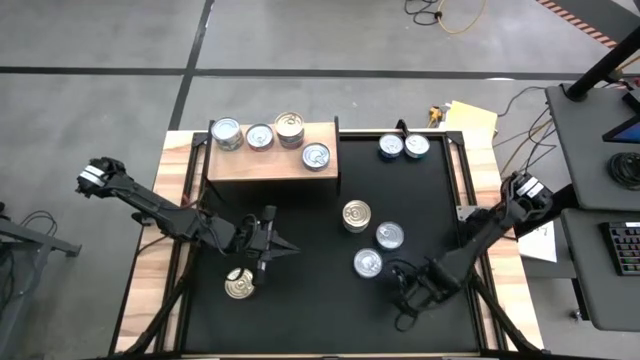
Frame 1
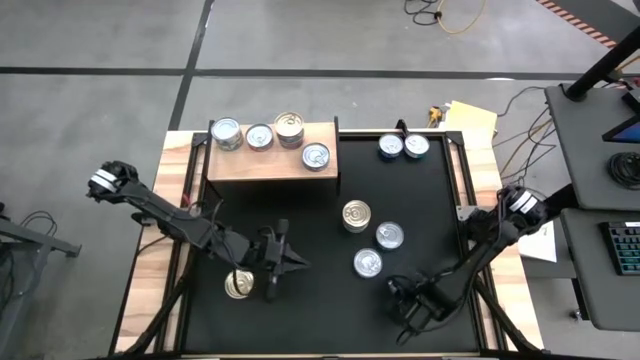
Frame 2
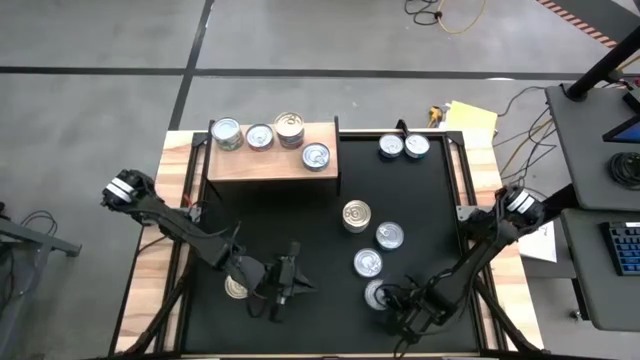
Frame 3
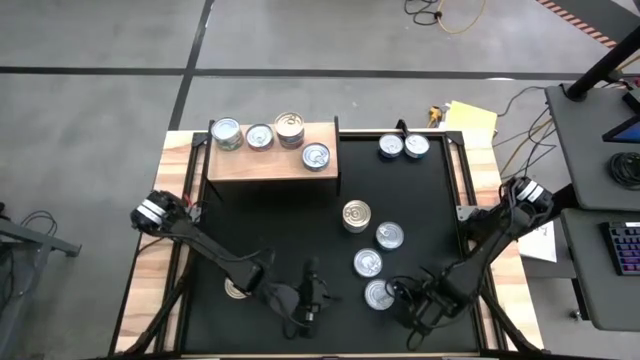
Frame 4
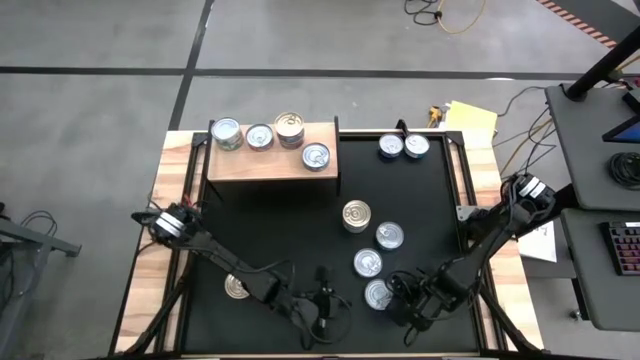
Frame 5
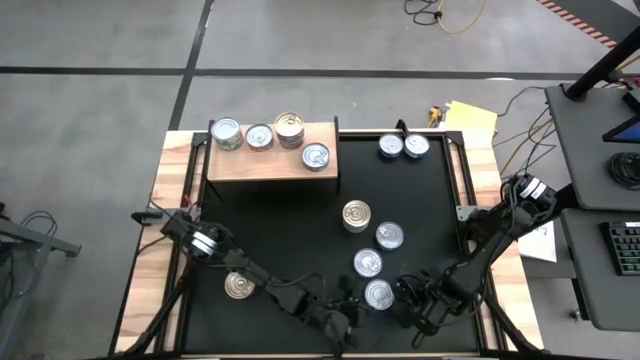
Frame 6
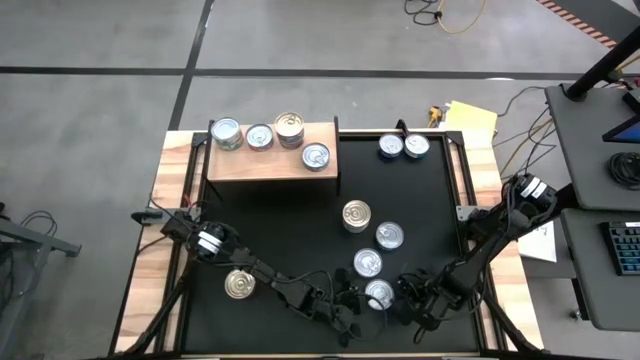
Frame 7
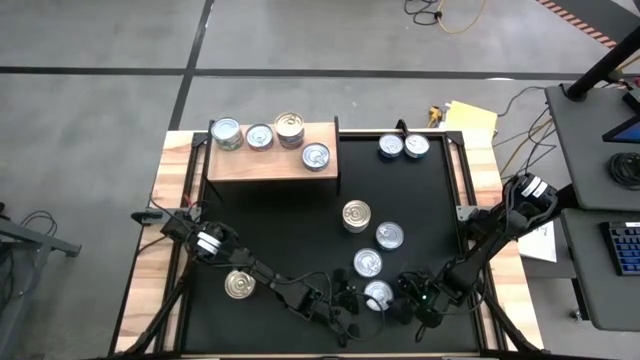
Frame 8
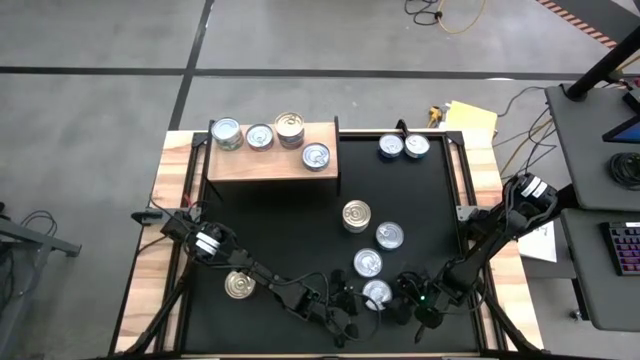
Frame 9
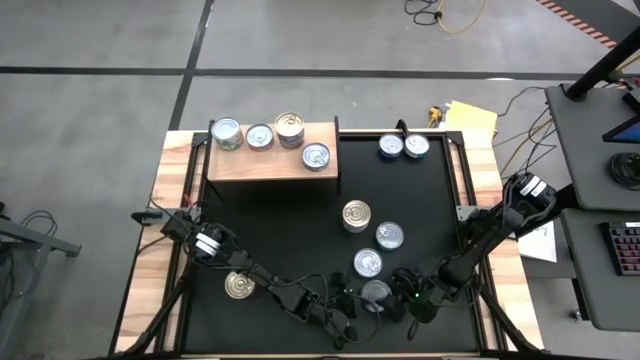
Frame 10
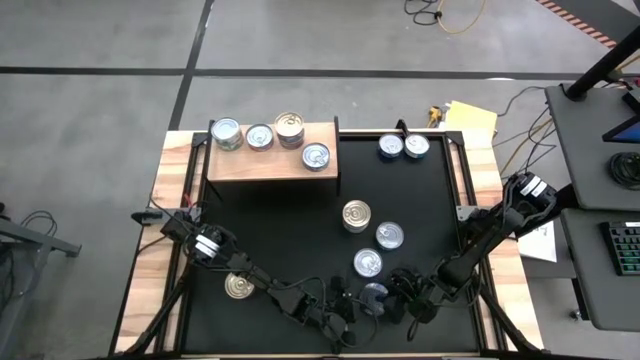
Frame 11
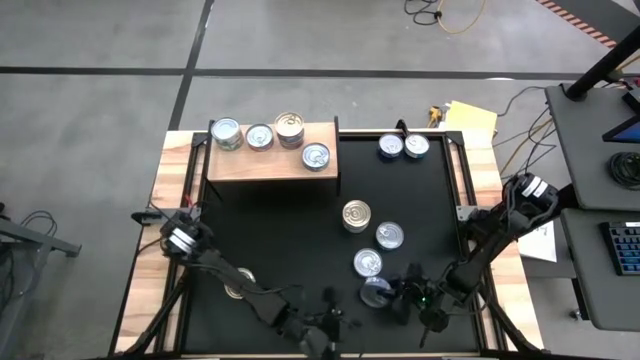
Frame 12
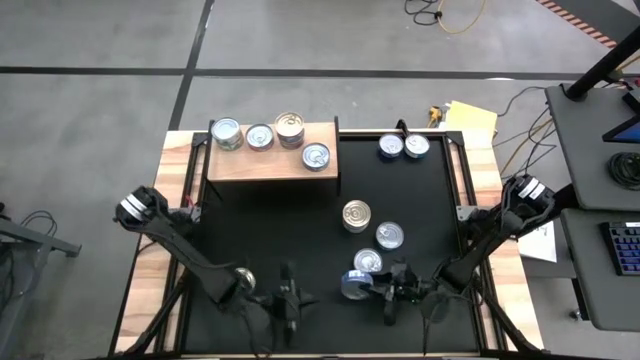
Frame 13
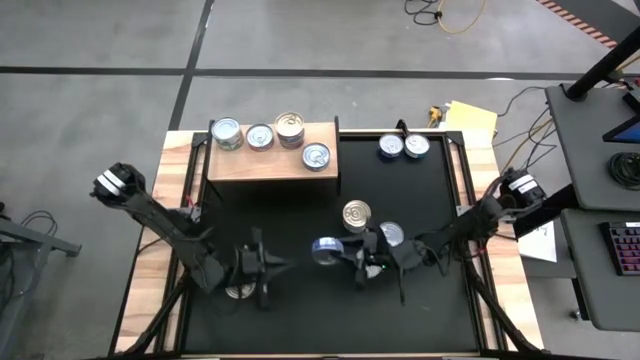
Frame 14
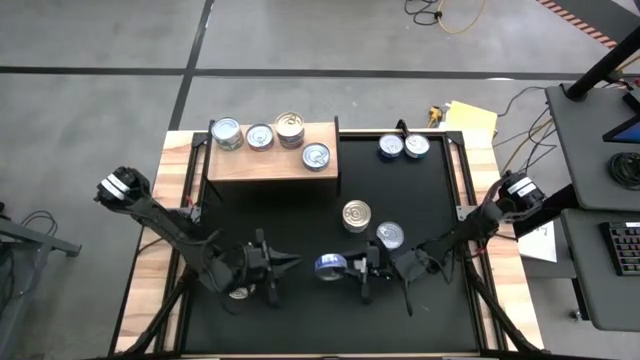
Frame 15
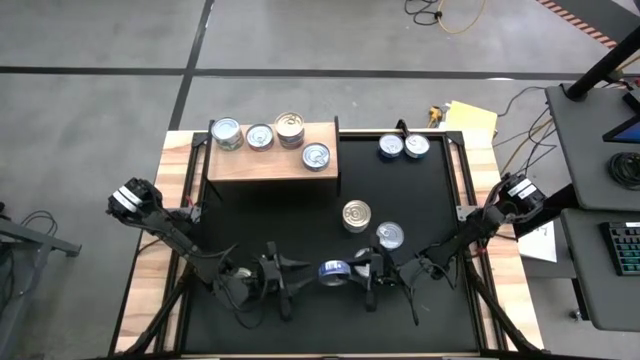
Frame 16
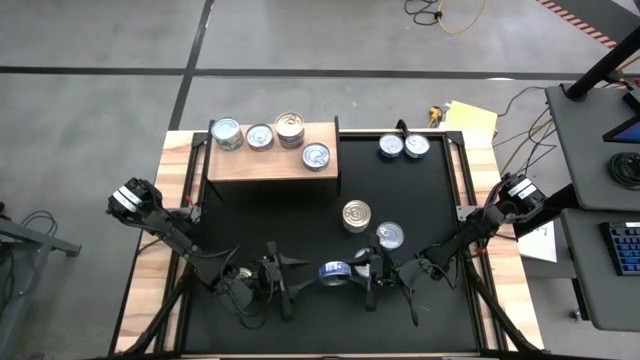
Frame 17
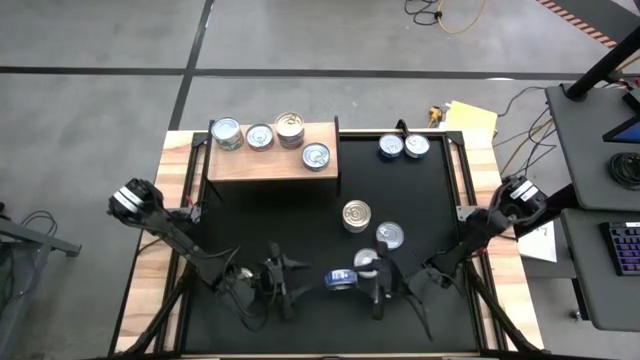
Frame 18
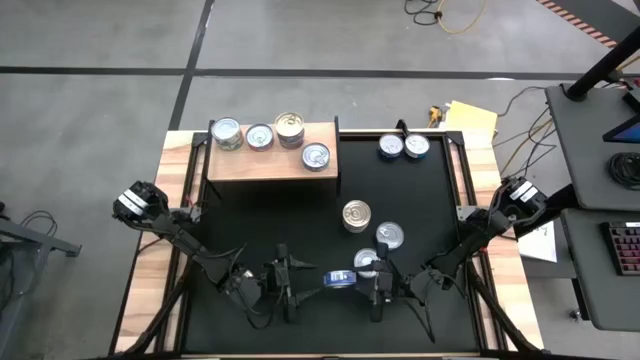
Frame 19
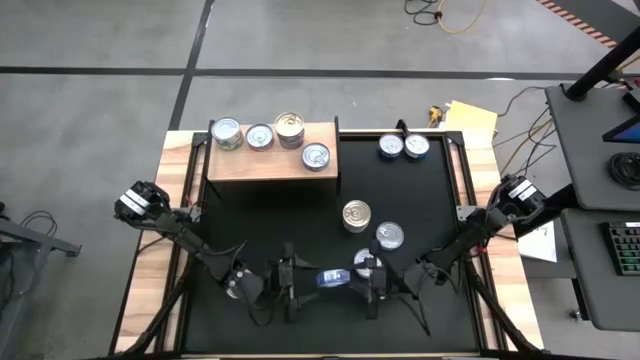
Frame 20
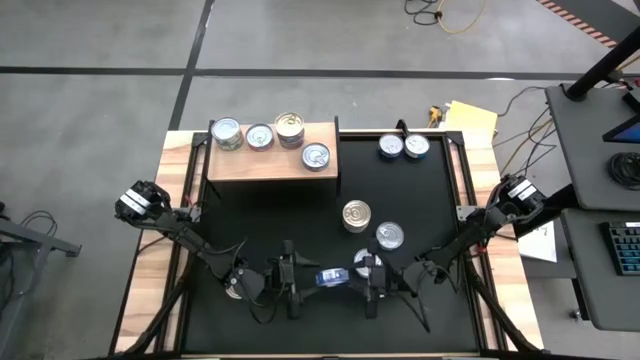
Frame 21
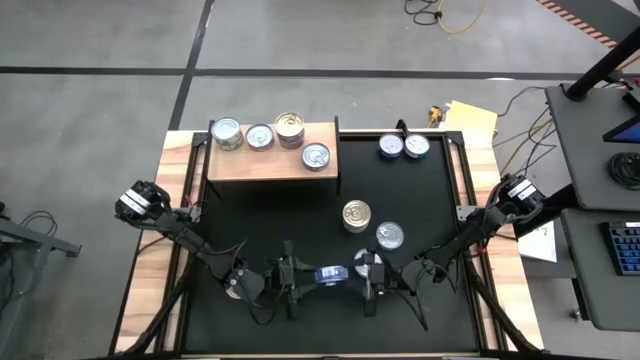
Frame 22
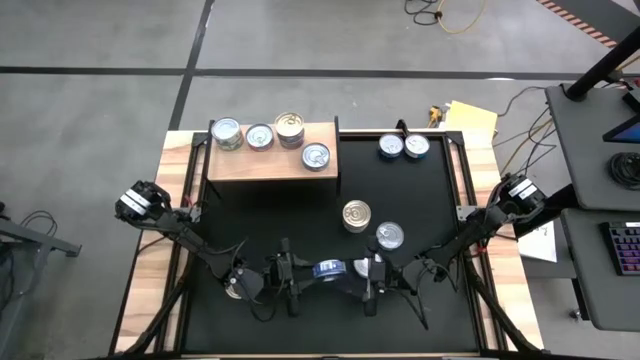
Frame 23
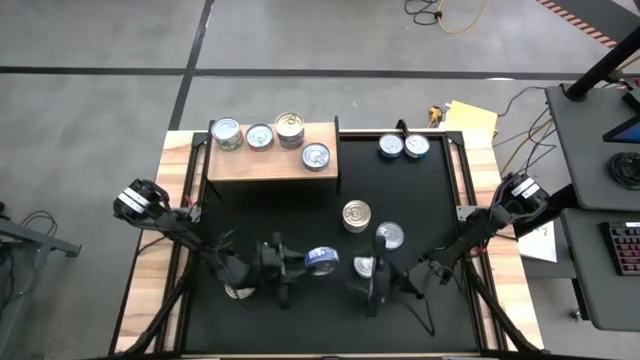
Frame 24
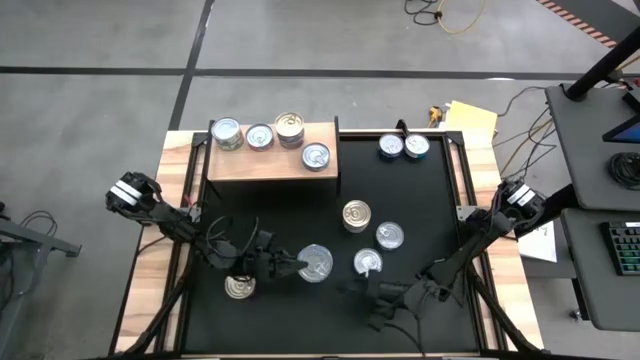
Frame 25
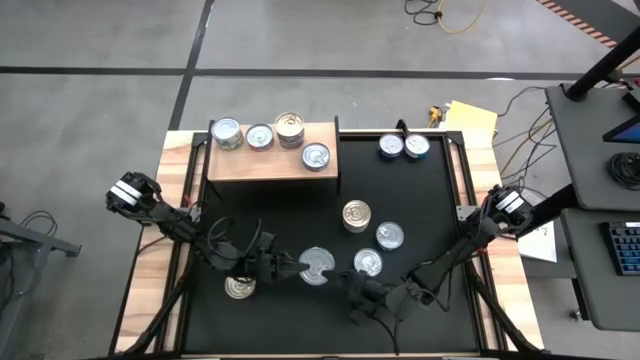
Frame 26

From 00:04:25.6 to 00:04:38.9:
Task: Stack canned seafood by type on shelf
Stack the blue tuna can on top of the blue tuna can on the shelf

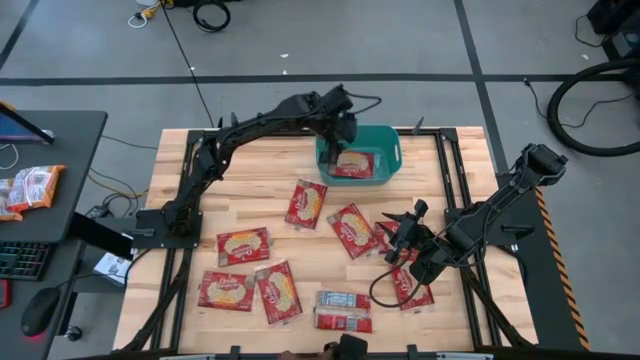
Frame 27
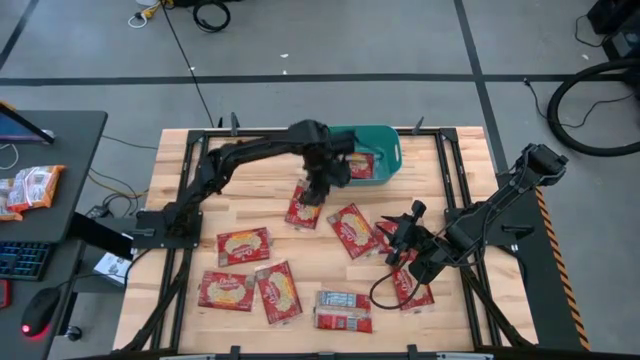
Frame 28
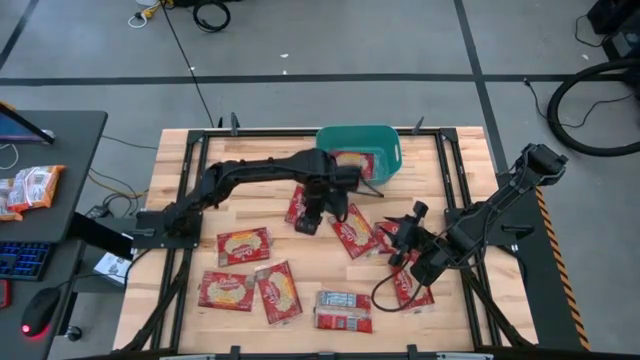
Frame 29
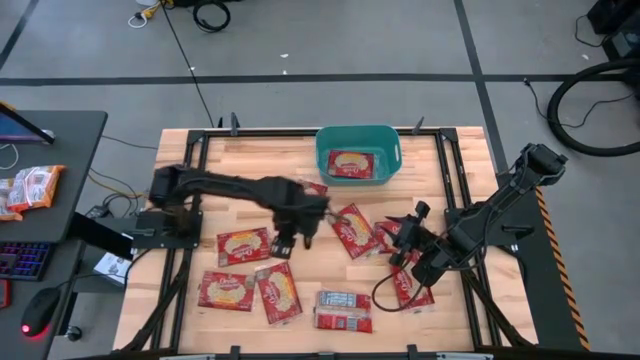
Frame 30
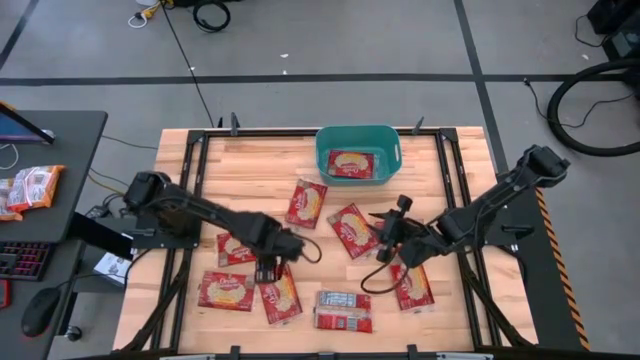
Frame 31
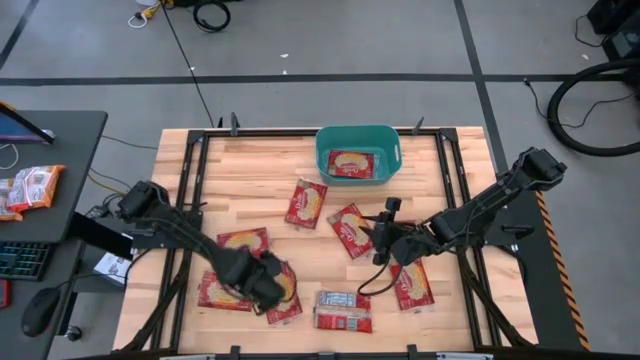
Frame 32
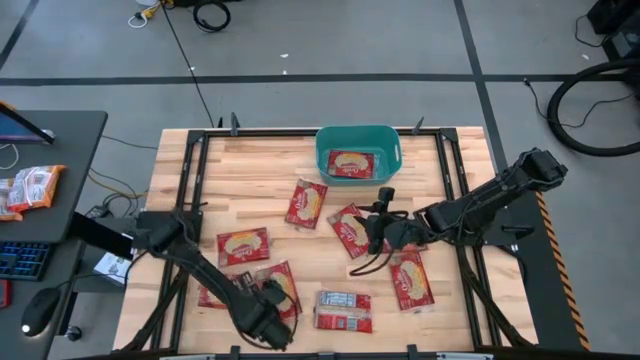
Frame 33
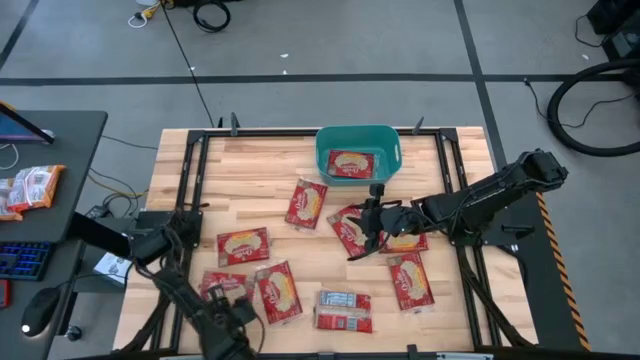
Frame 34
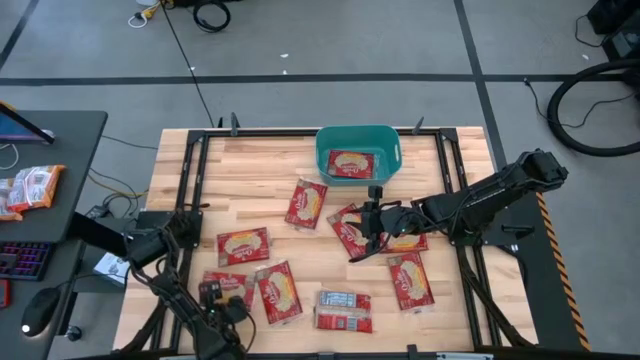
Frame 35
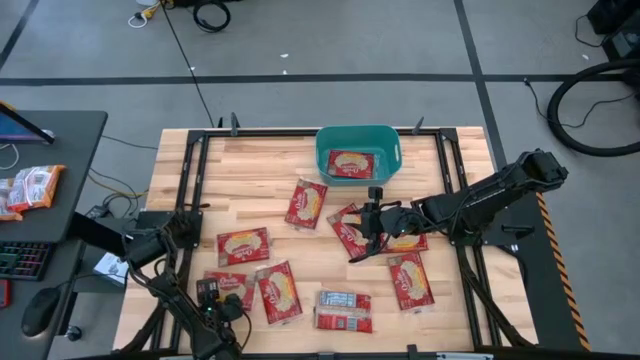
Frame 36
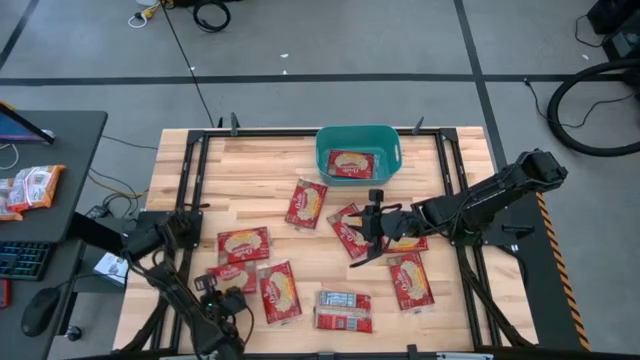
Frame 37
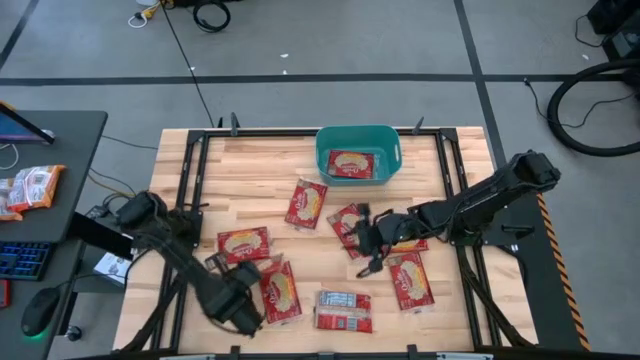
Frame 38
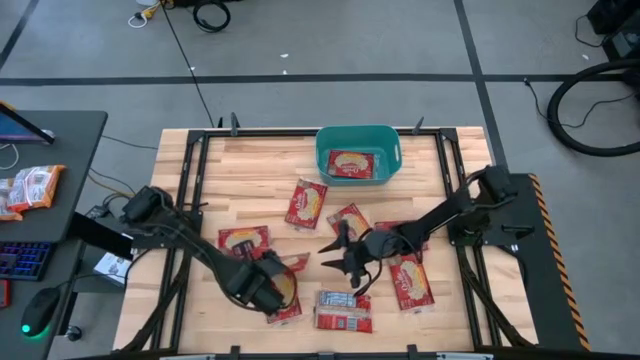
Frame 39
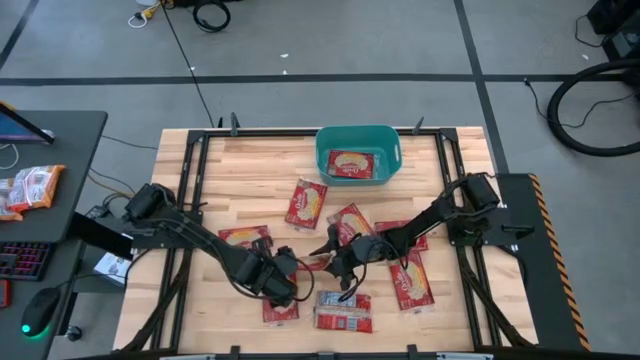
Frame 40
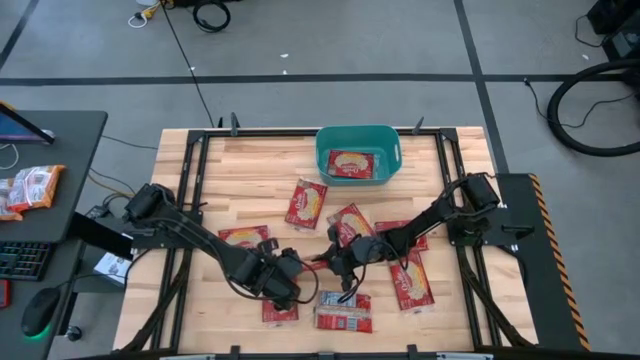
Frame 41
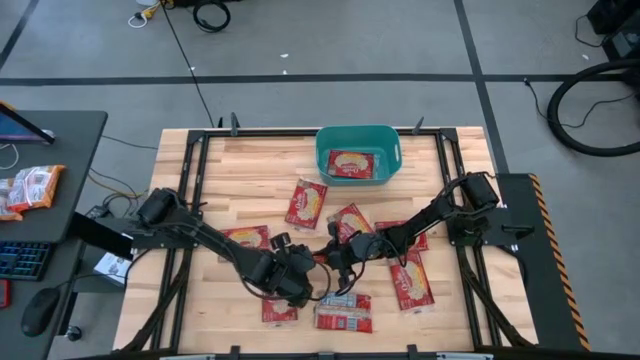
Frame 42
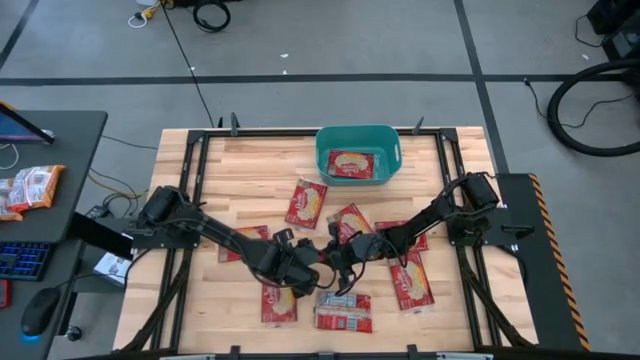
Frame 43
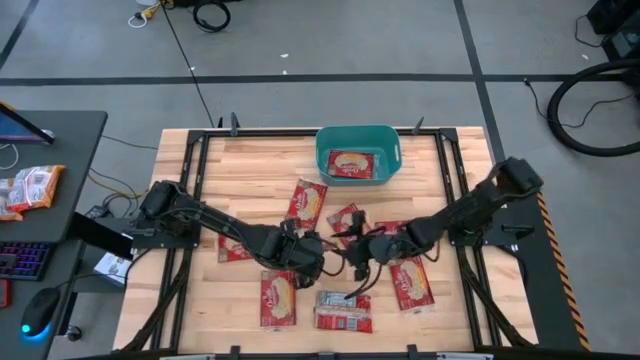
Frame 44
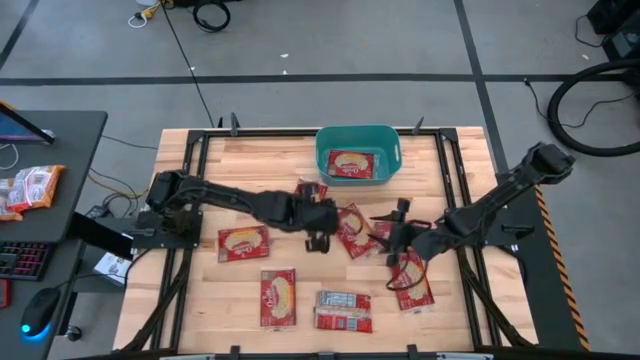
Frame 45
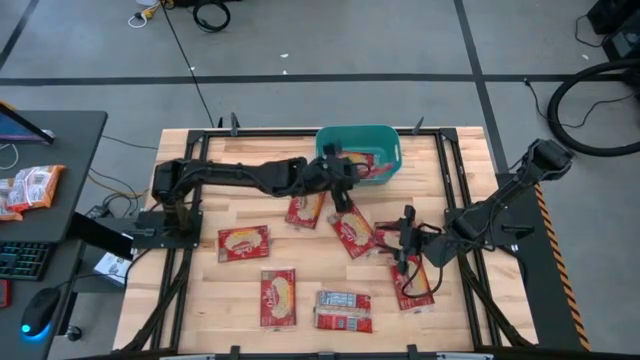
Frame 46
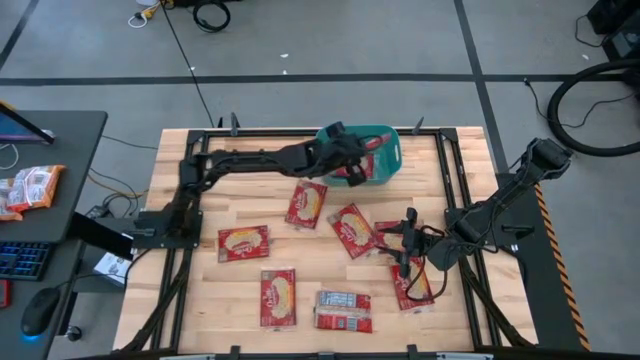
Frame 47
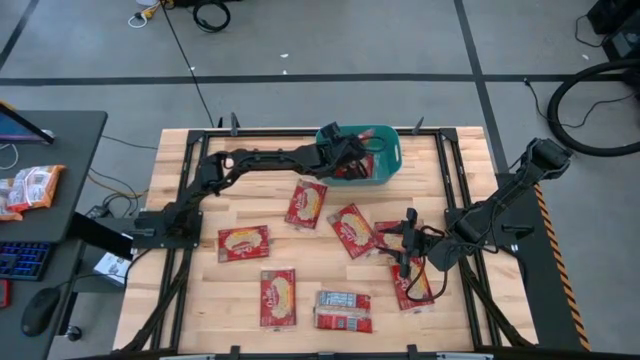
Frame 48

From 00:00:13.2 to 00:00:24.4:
Task: Sort popcorn bags into baskets
Put the red popcorn bag into the blue bin
